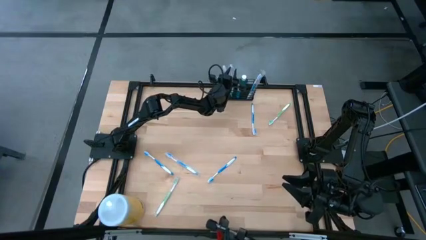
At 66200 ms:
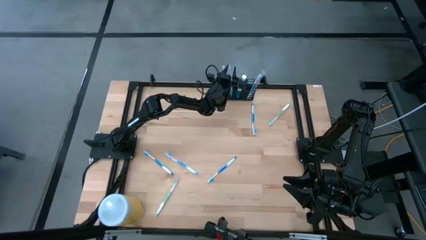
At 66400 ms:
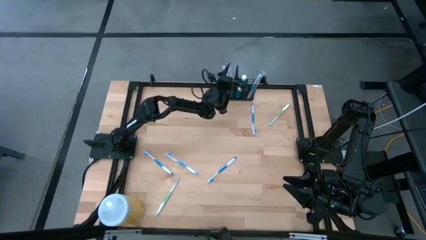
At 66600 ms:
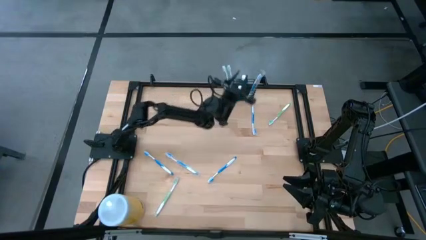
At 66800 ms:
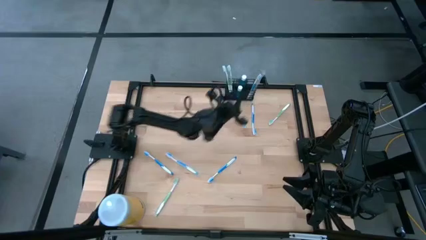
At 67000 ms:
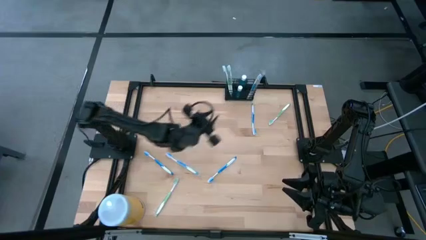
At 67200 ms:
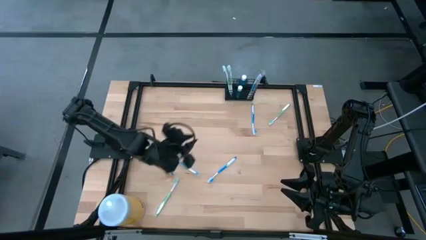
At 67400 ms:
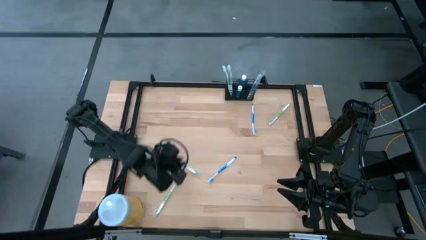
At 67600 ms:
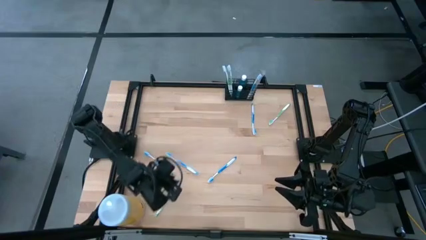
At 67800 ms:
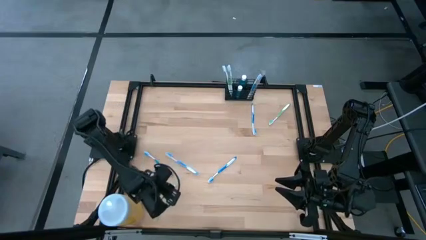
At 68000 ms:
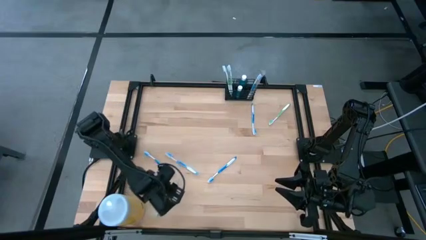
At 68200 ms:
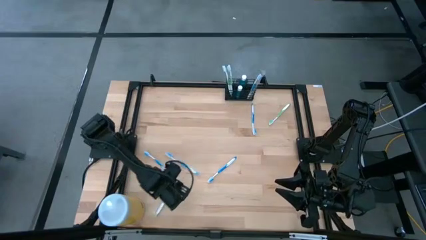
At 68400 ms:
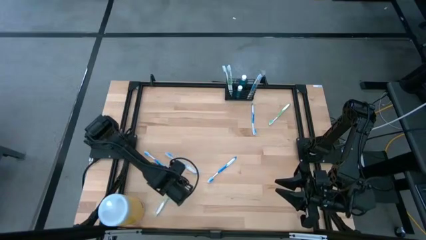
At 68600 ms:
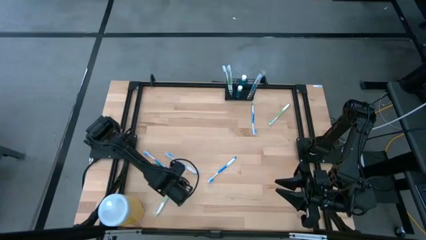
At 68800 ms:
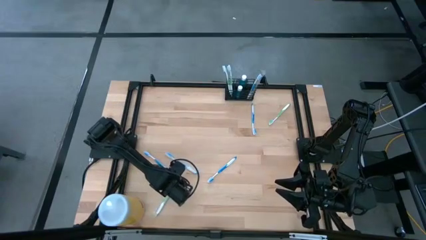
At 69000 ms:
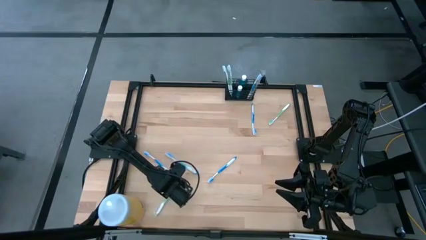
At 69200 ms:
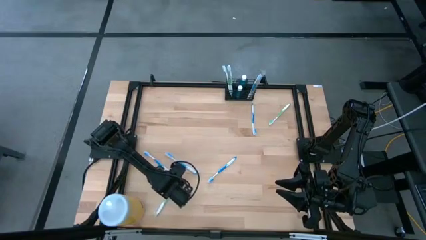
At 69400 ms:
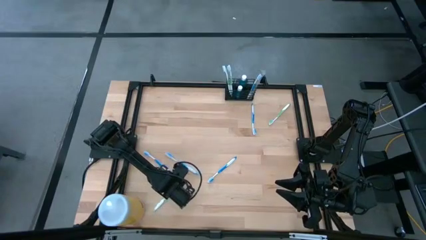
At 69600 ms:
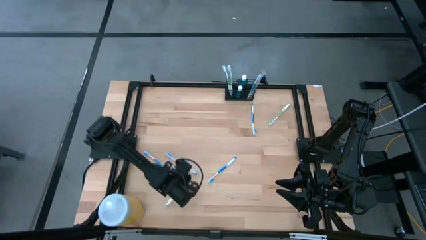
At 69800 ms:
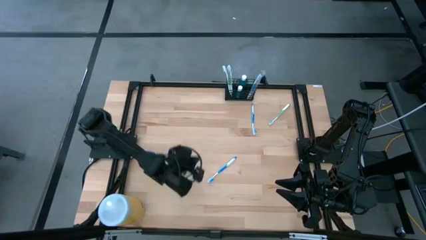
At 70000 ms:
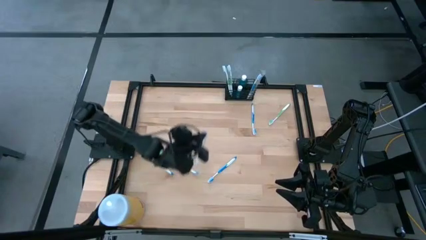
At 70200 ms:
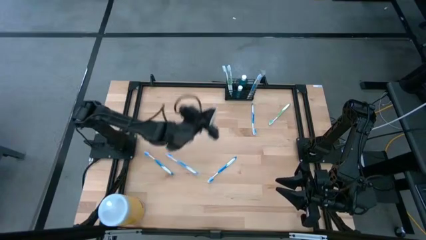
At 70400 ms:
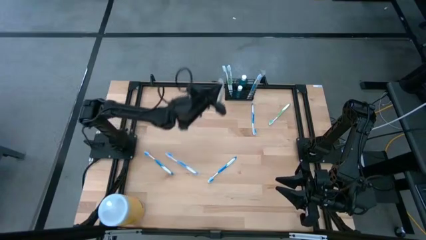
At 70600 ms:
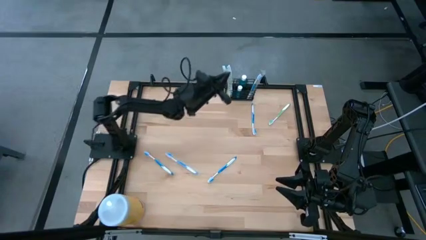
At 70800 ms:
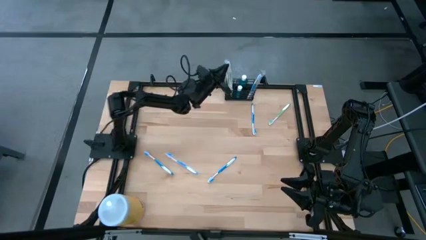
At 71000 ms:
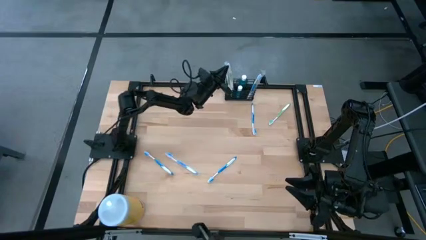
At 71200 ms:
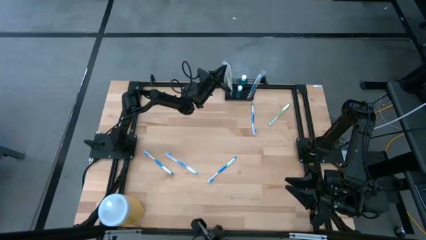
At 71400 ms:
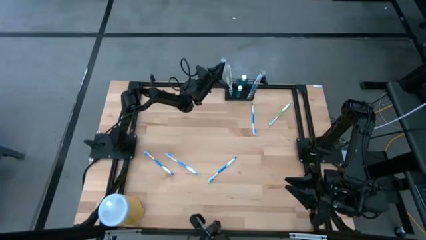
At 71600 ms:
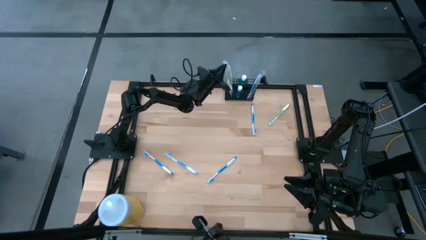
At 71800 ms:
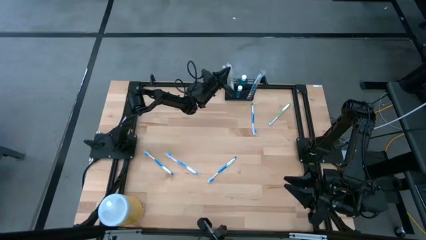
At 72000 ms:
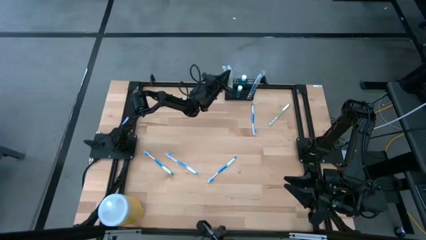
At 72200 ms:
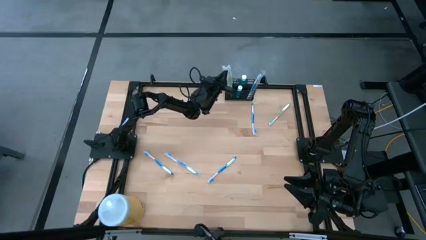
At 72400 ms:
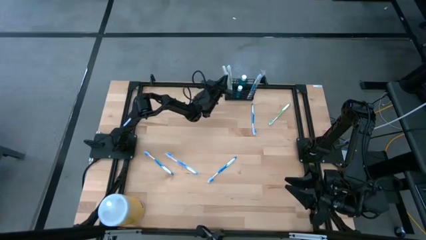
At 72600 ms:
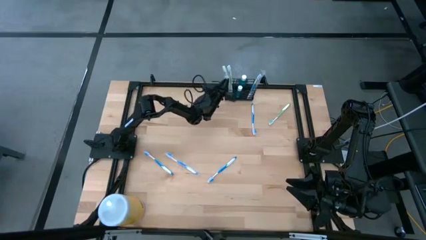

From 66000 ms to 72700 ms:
Task: Pick & Place toothbrushing station
Put the green toothbrush into the black organizer

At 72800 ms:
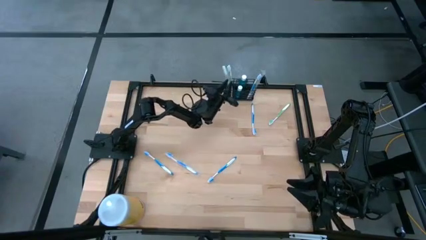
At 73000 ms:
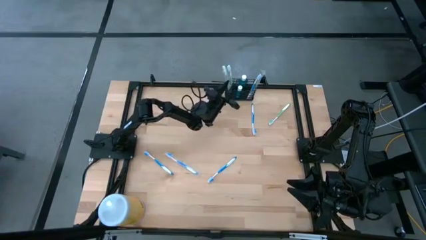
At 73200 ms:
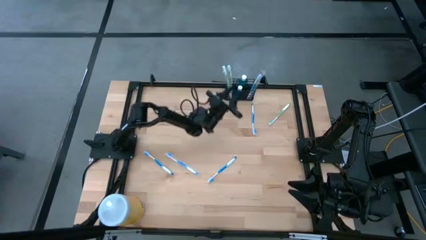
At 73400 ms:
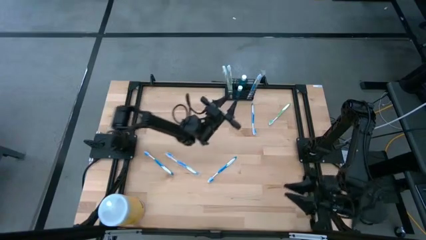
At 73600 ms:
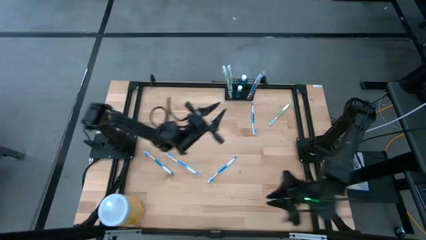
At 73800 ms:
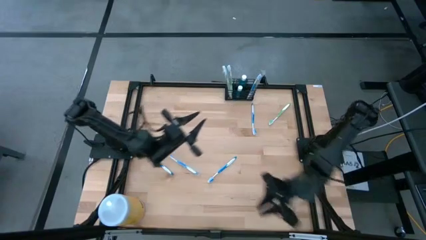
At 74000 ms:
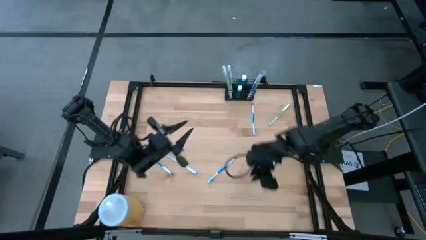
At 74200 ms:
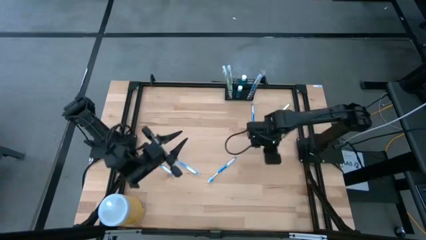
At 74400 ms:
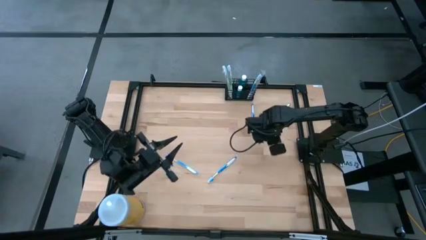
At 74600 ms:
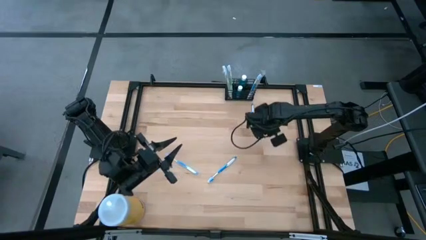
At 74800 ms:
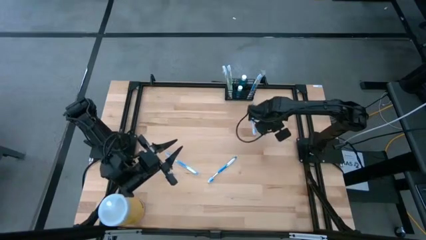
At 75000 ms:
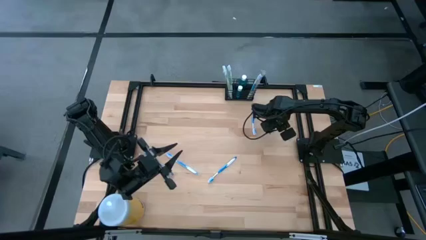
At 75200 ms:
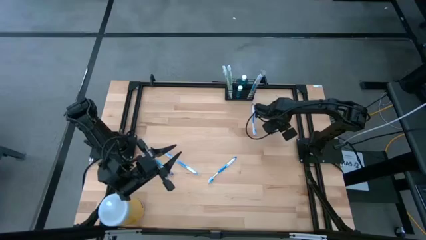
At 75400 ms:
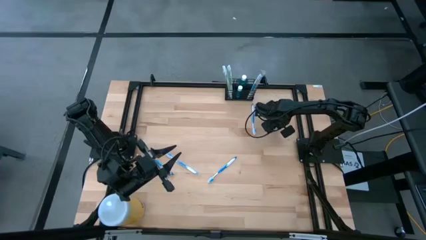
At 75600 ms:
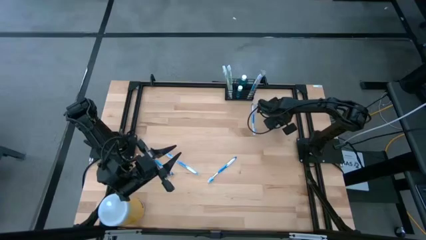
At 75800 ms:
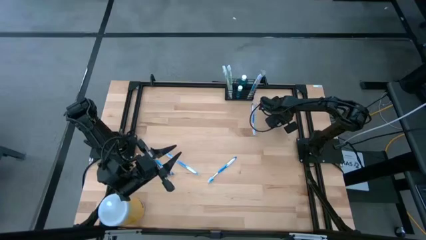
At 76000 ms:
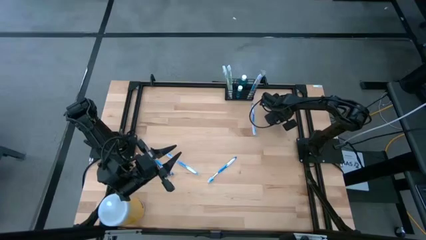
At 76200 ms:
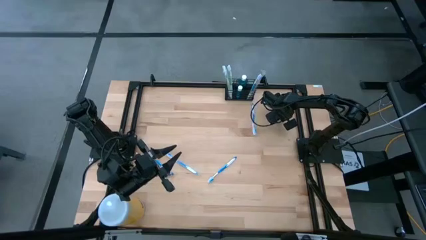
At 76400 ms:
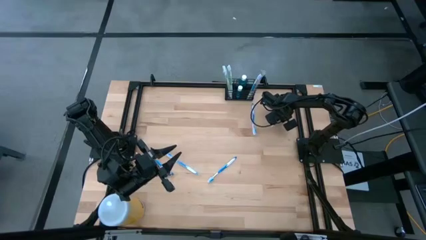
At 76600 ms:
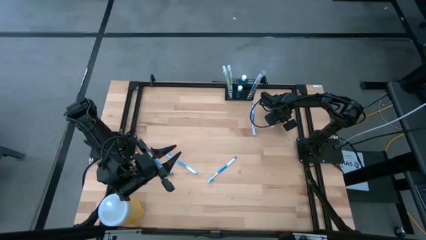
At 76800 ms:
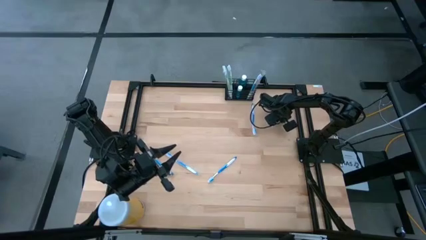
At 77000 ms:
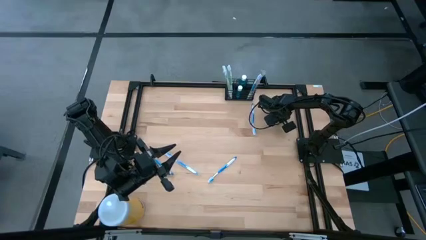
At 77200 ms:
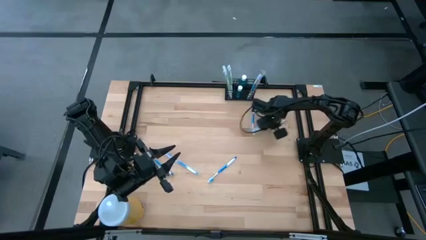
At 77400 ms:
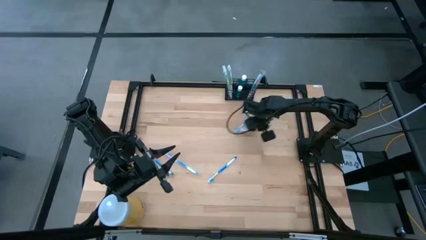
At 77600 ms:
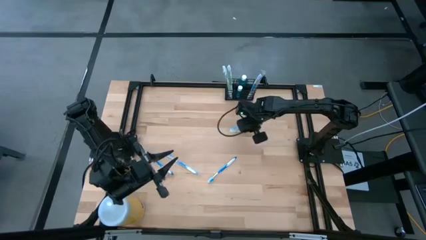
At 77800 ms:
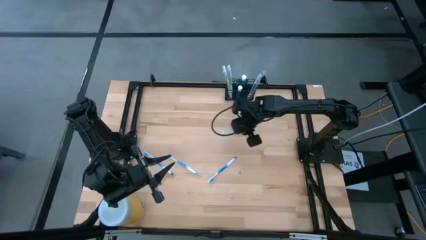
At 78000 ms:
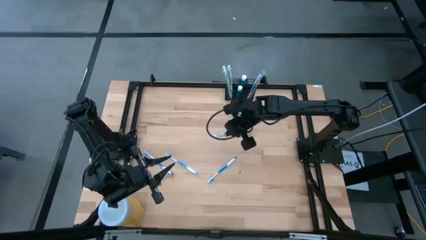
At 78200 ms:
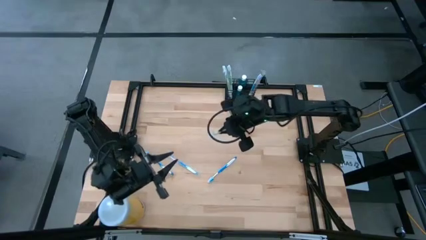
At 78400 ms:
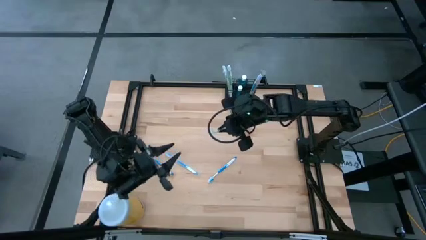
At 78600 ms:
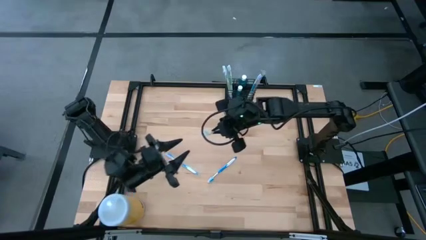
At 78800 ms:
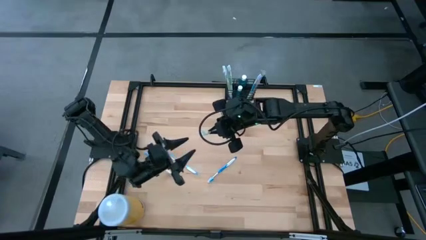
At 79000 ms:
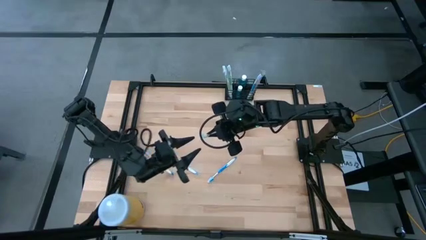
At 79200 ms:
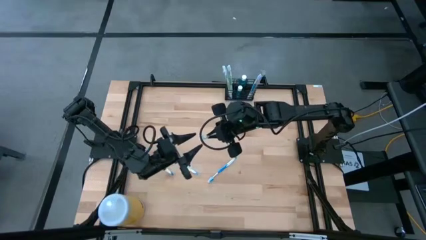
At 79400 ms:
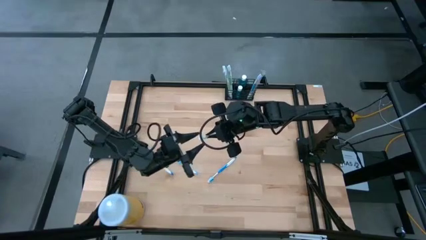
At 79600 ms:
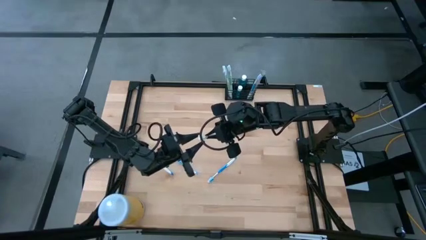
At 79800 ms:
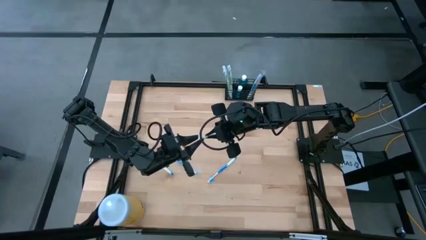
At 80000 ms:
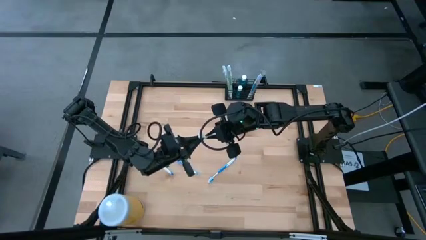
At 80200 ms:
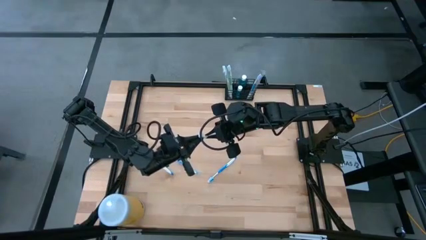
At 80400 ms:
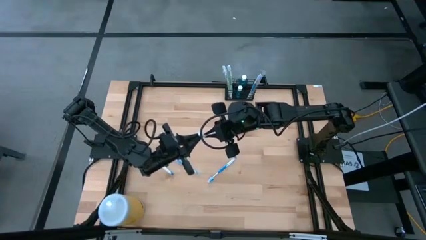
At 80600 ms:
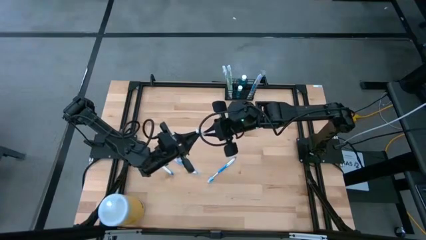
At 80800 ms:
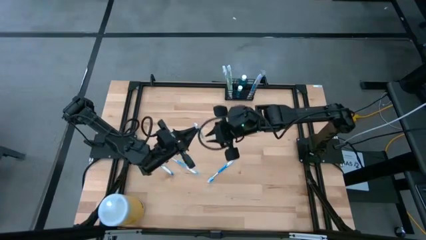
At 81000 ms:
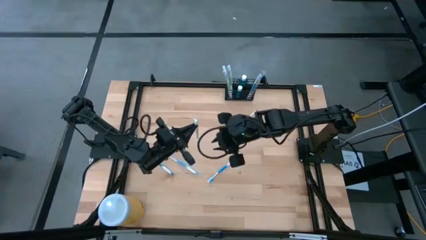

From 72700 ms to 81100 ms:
Put the green toothbrush into the black organizer
